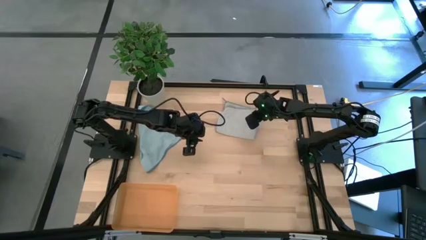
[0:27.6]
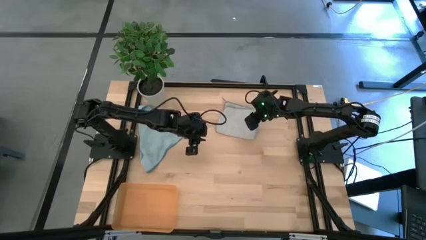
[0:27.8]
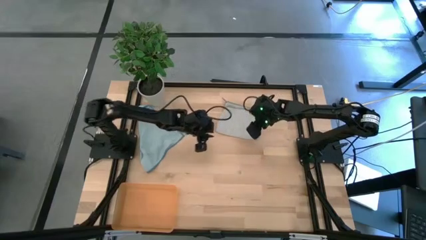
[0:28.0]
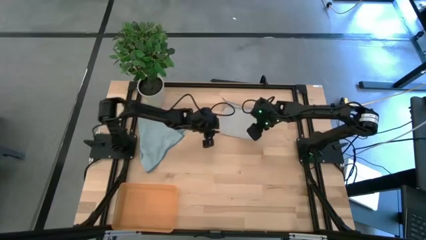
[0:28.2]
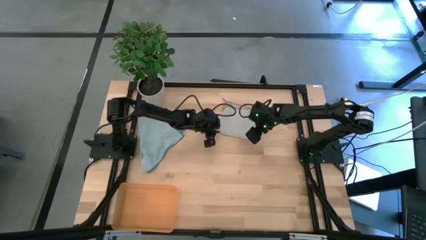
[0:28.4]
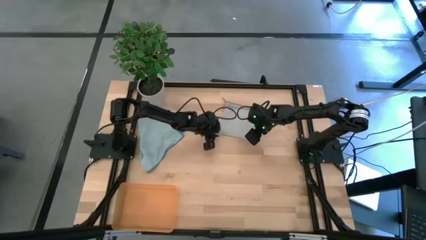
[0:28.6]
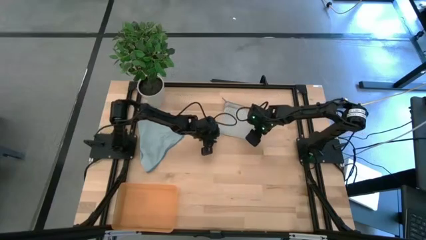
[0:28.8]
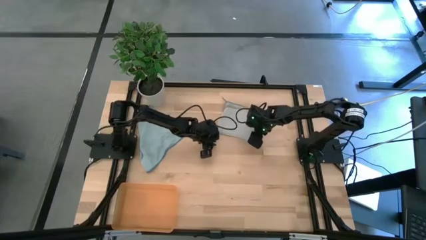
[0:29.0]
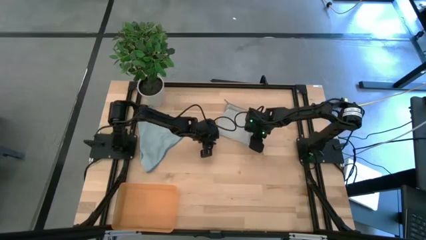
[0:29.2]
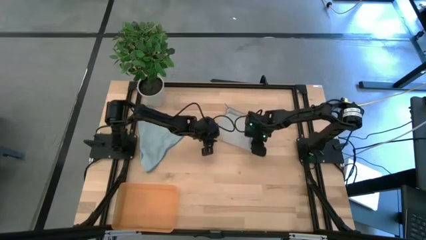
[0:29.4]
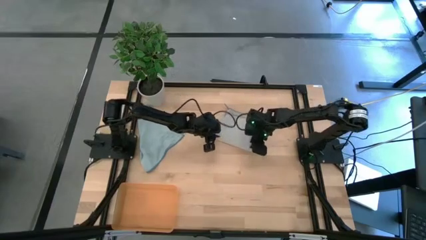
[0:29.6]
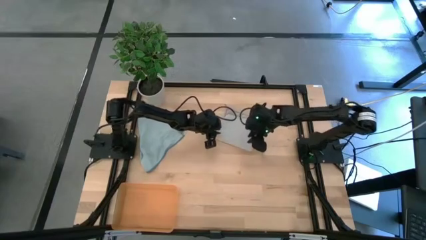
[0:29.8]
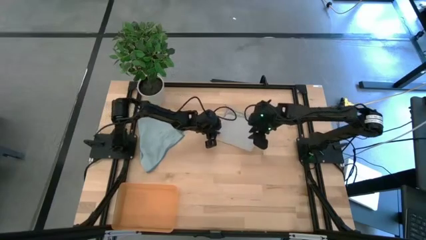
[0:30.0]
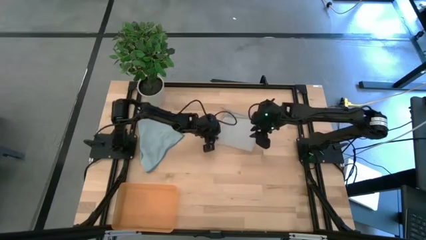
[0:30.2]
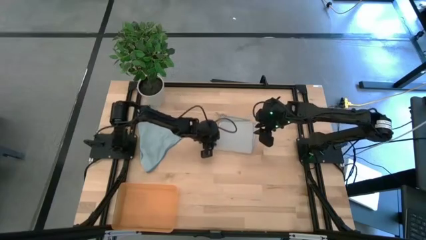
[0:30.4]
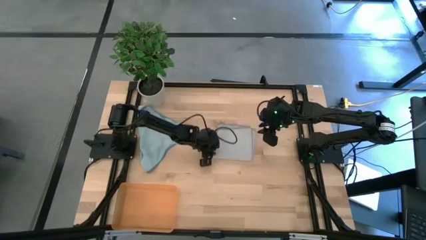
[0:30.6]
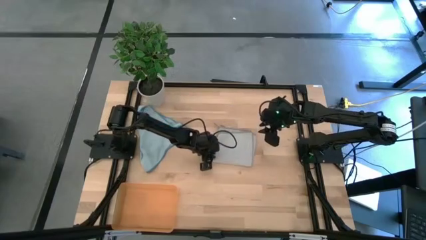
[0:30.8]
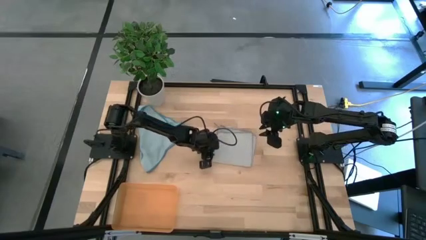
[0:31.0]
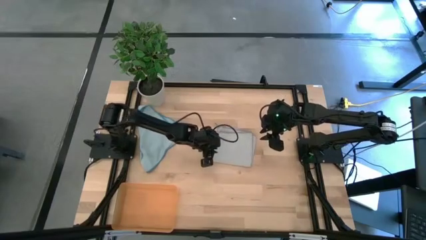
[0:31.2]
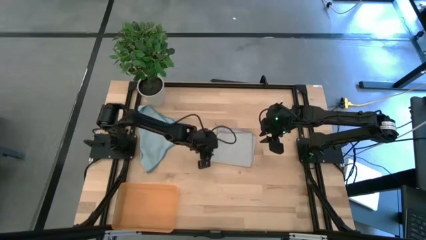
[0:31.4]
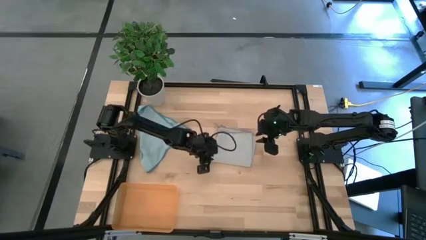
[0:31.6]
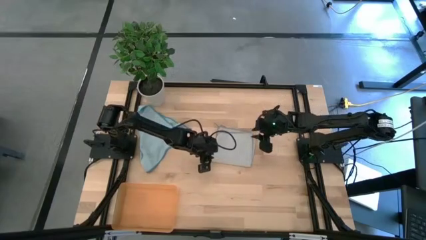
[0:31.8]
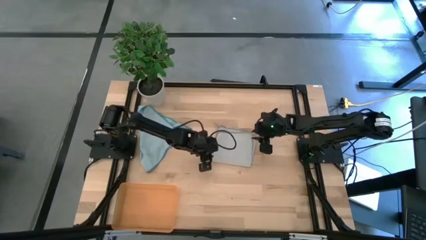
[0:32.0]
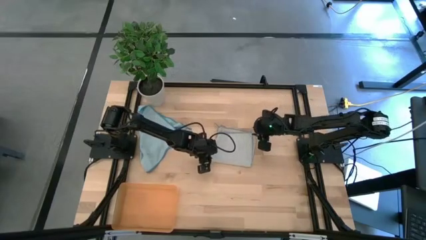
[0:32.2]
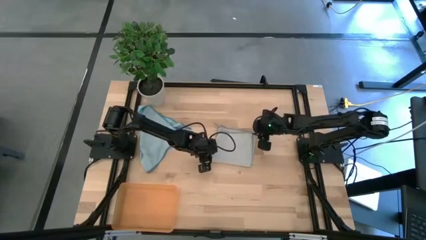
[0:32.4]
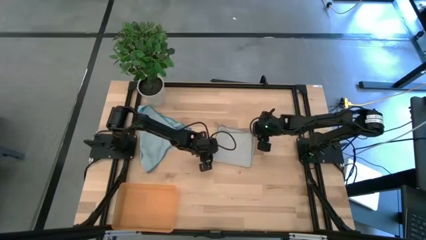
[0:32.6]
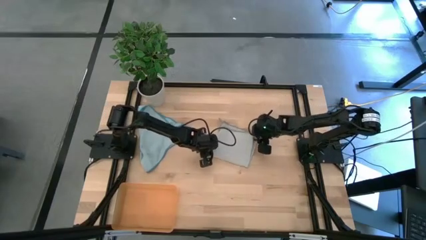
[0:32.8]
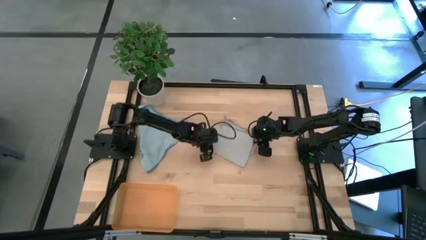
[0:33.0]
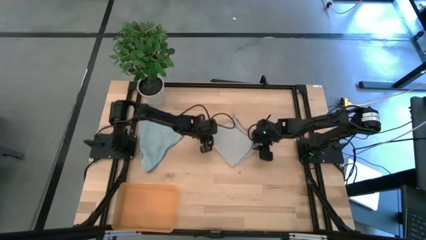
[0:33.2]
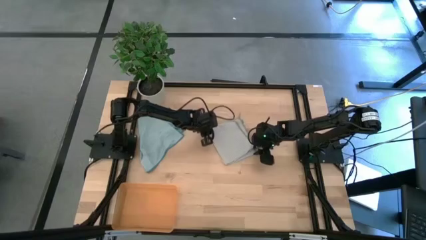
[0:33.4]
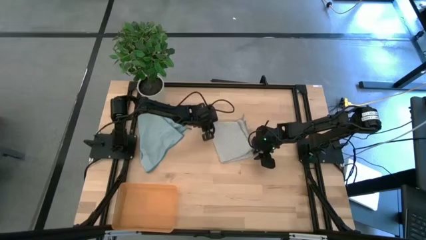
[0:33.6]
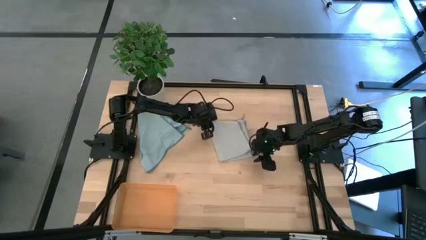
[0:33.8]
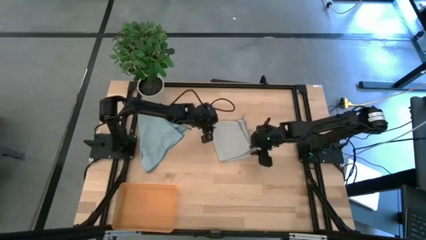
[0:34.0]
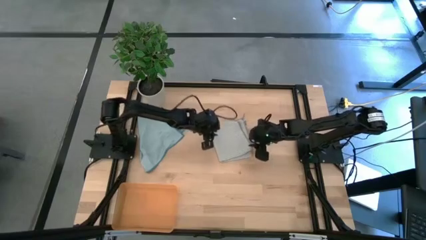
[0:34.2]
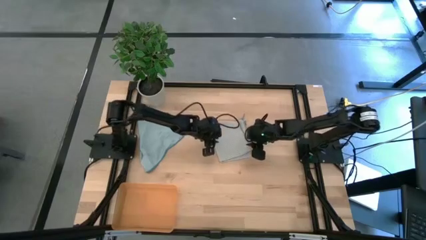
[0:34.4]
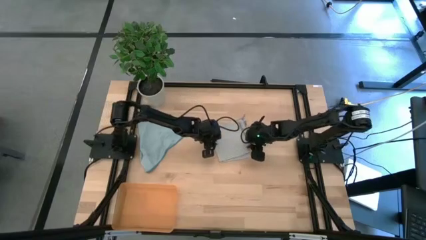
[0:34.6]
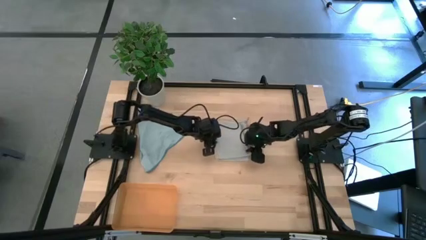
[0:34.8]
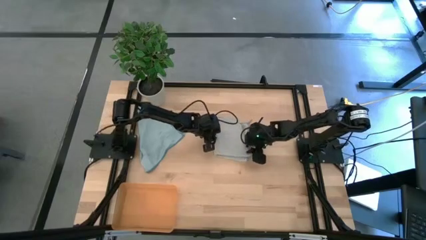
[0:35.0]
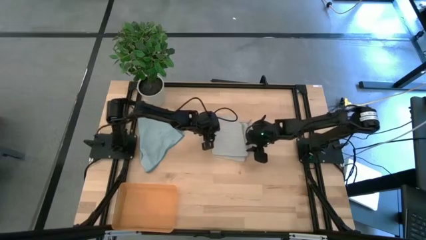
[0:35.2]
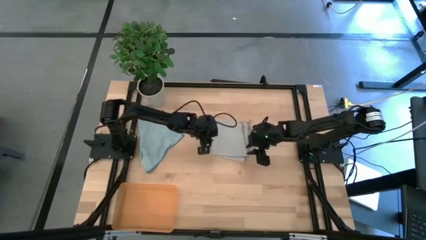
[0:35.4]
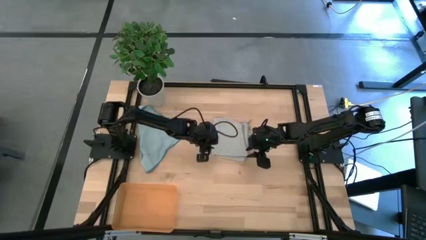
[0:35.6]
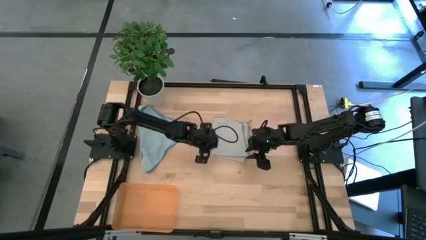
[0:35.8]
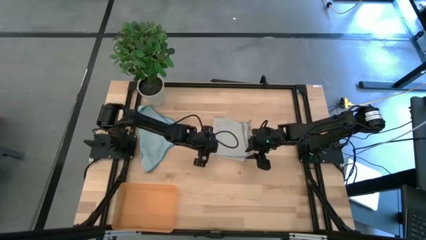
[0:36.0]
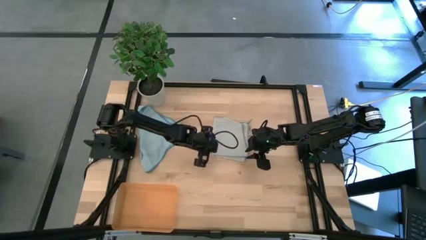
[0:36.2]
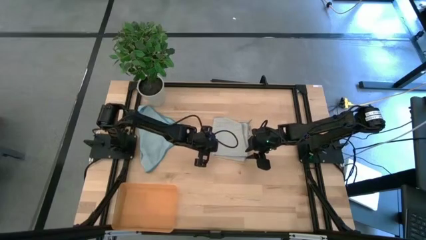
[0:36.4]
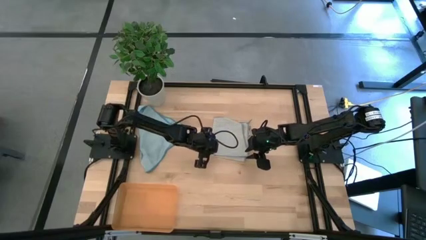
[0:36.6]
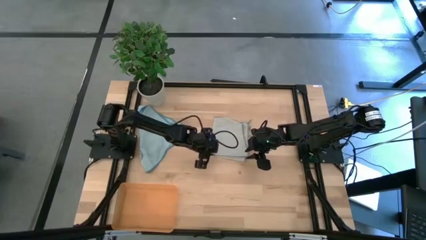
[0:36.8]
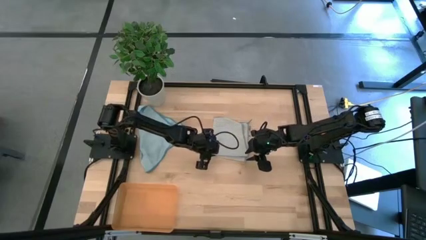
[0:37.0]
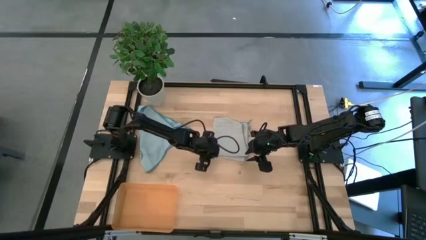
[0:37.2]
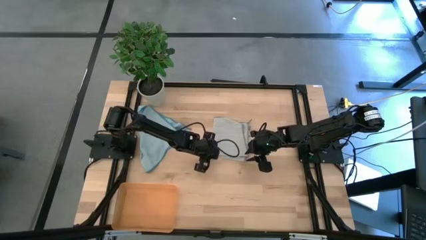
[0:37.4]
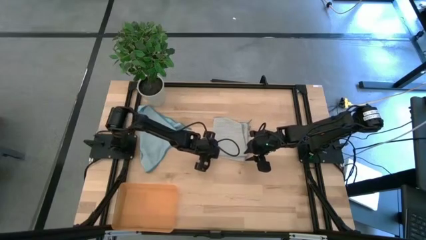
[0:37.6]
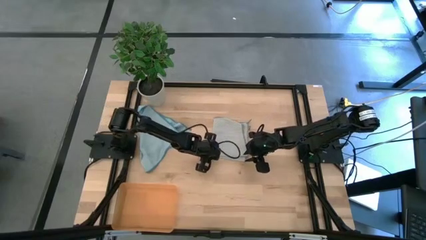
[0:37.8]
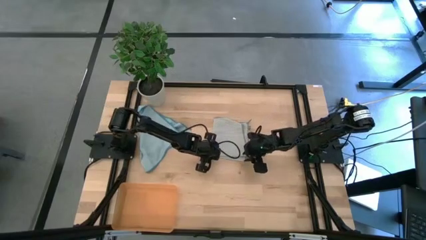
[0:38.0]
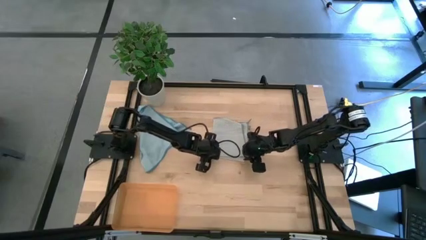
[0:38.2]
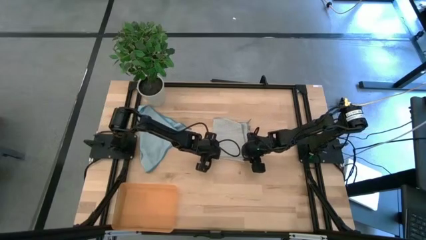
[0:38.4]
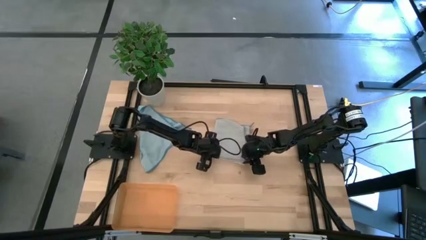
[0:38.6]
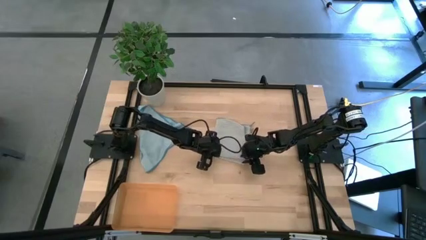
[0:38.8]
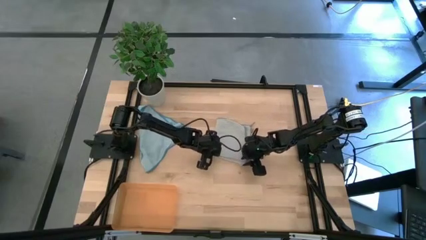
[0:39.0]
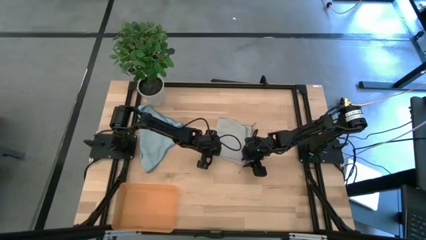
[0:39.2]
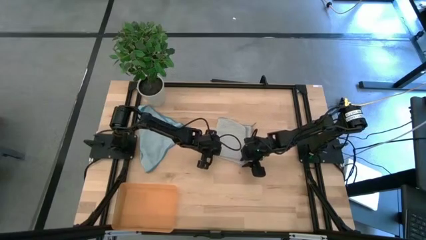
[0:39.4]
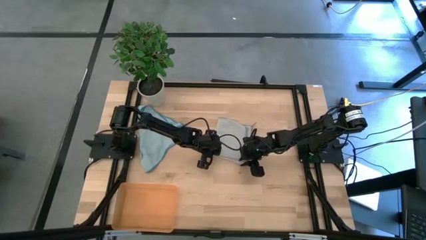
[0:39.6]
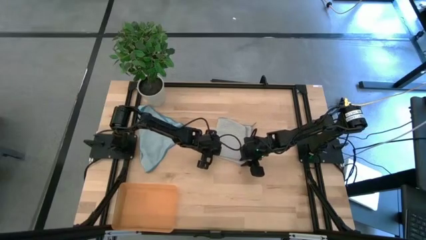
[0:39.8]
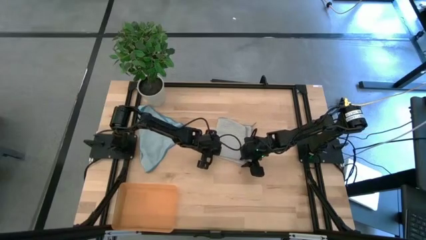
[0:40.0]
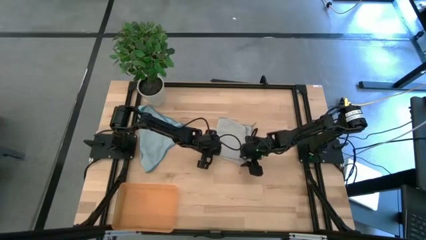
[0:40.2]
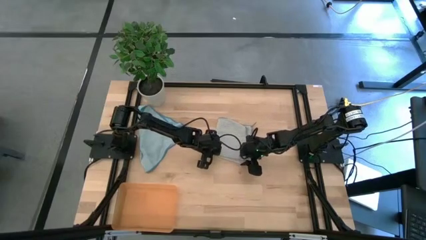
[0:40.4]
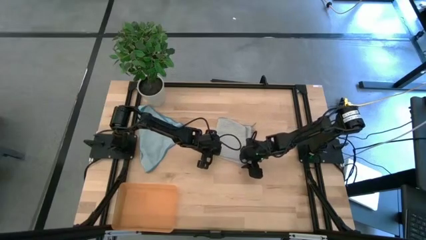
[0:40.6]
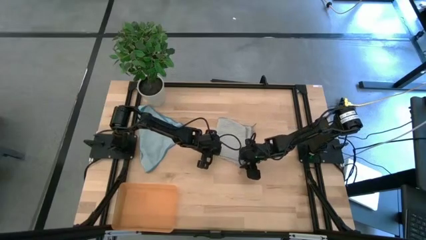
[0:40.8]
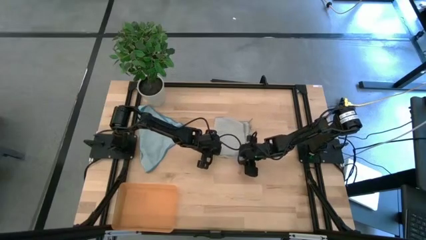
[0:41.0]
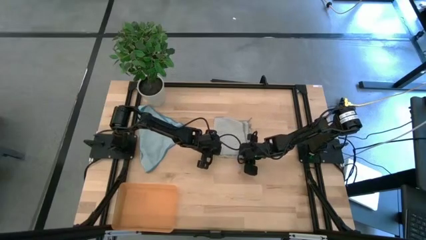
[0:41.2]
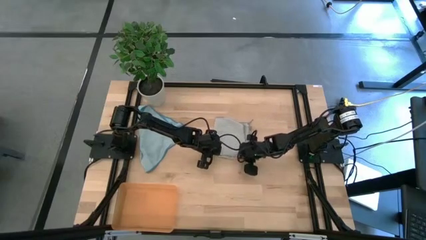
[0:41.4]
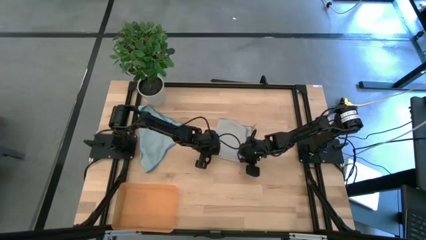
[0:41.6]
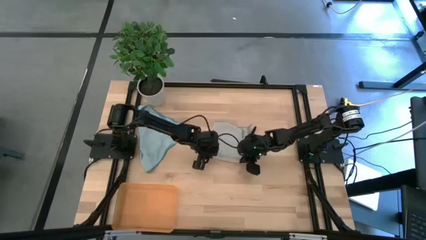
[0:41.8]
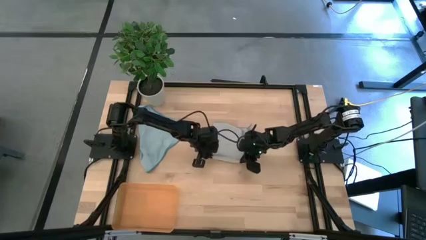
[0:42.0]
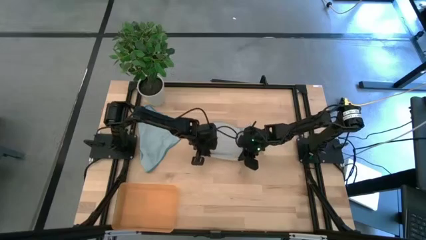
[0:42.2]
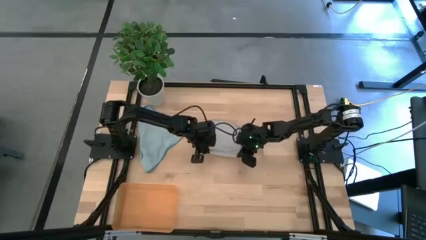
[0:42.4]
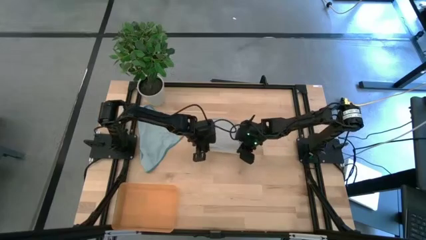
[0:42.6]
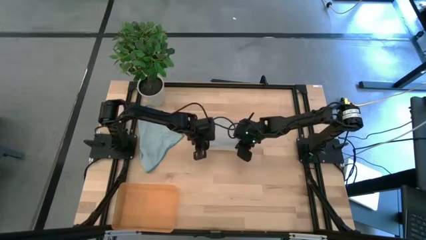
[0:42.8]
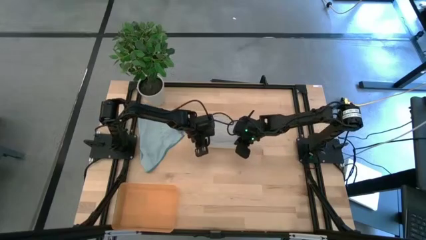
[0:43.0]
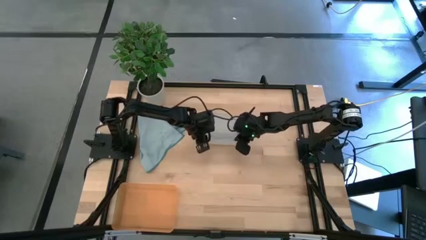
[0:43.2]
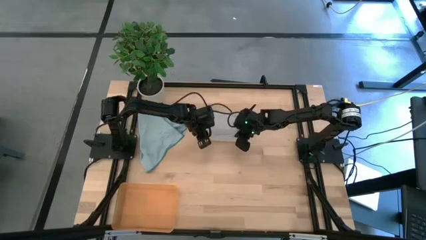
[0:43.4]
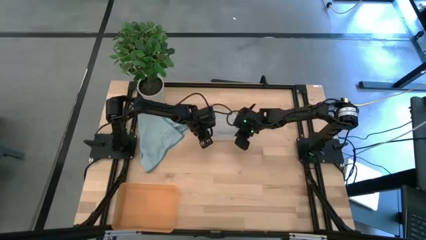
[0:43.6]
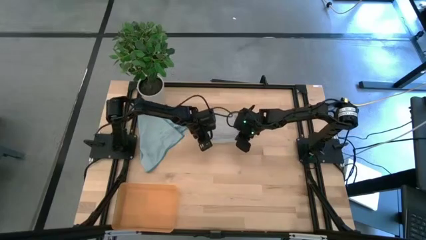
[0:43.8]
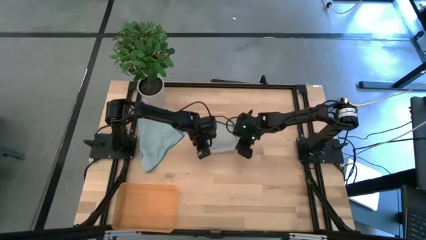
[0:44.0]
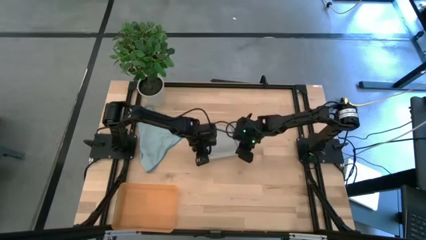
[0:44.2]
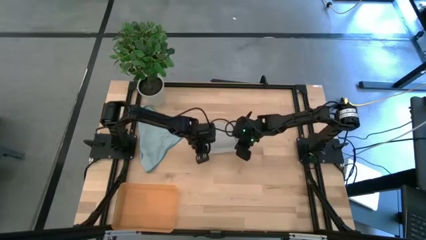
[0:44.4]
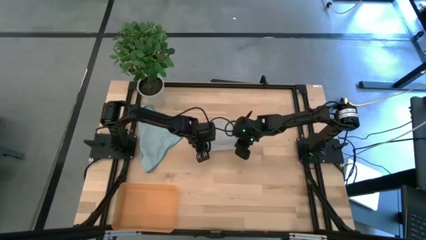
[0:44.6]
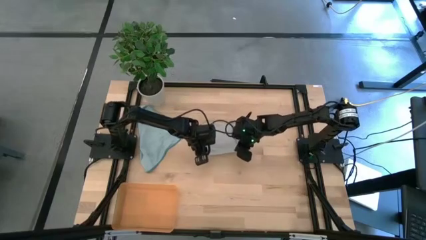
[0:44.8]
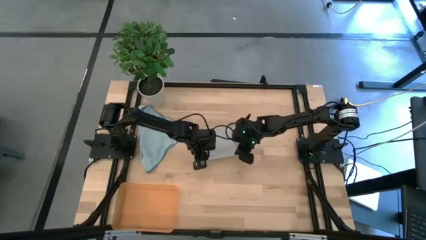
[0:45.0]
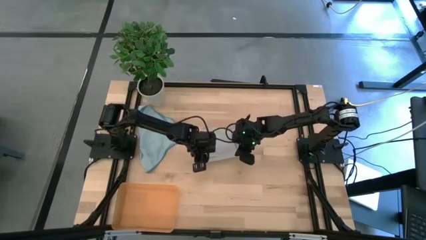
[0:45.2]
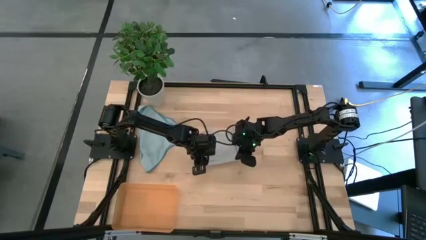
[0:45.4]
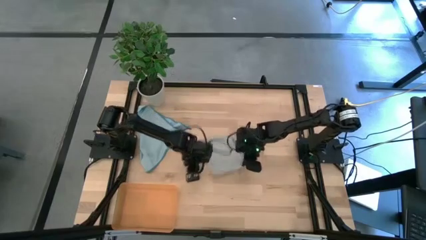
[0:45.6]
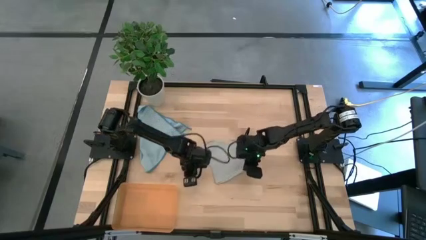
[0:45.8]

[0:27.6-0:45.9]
Task: Roll microfiber towels into tight, uniform cylinder then place into a basket
Roll the gray microfiber towel
